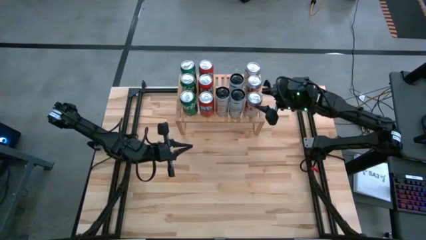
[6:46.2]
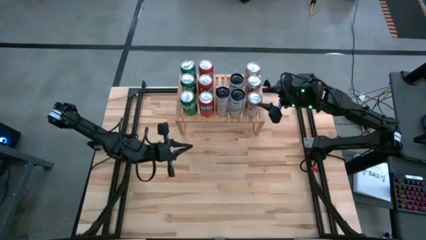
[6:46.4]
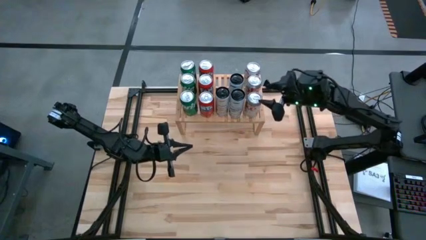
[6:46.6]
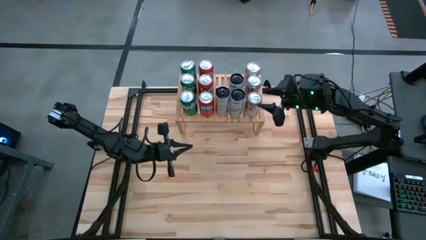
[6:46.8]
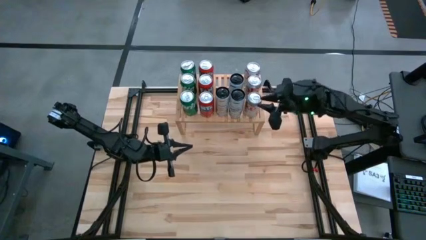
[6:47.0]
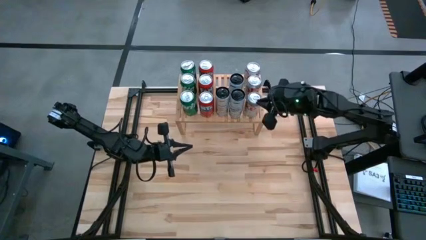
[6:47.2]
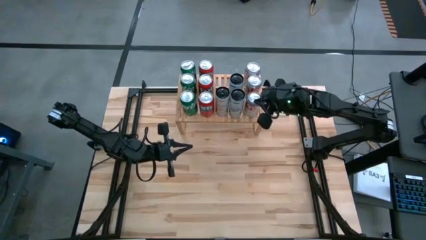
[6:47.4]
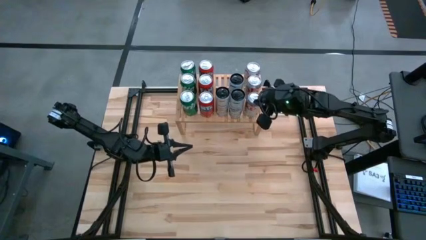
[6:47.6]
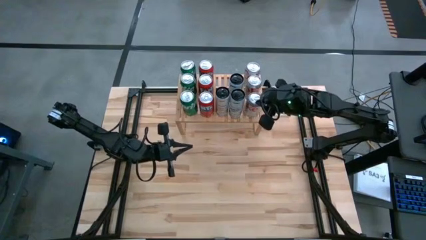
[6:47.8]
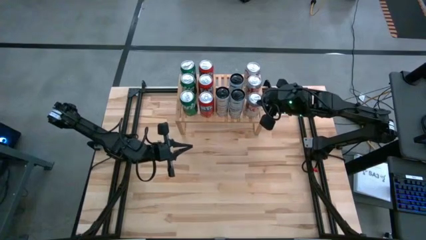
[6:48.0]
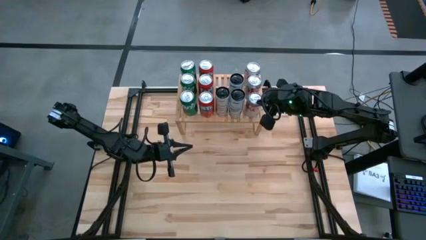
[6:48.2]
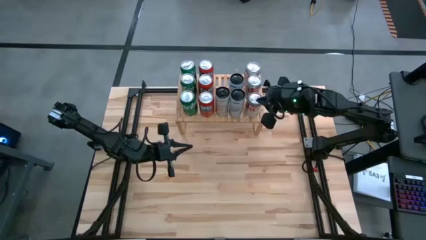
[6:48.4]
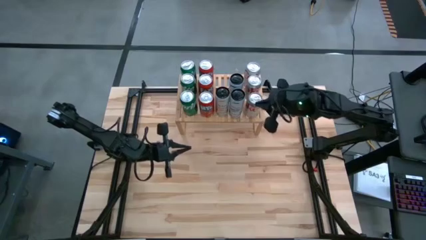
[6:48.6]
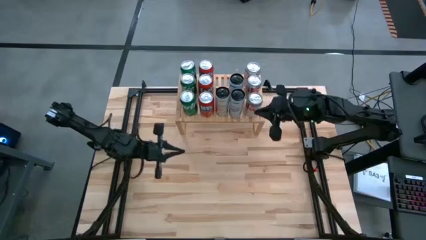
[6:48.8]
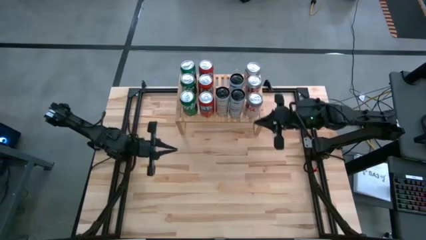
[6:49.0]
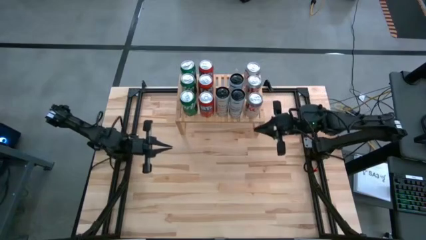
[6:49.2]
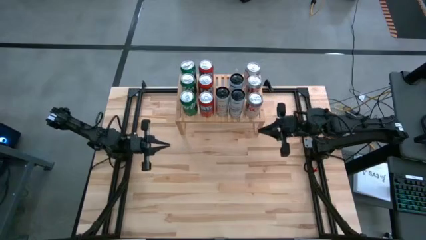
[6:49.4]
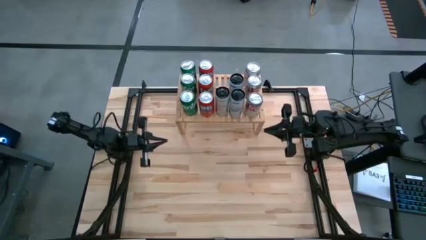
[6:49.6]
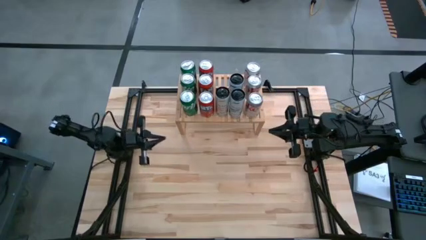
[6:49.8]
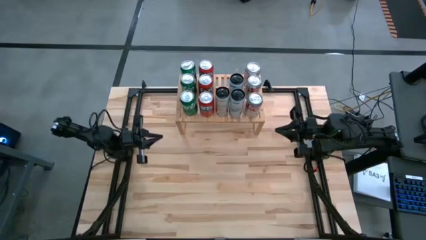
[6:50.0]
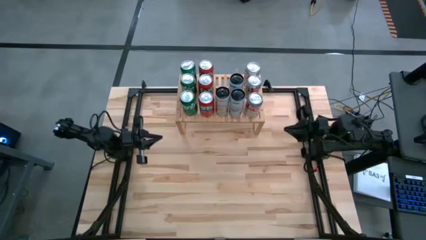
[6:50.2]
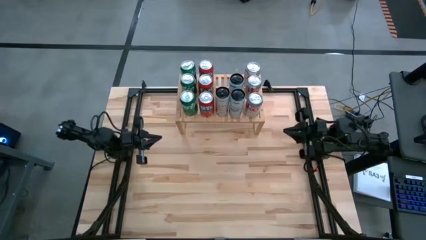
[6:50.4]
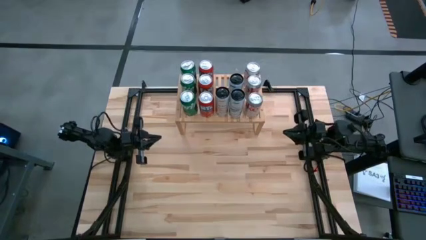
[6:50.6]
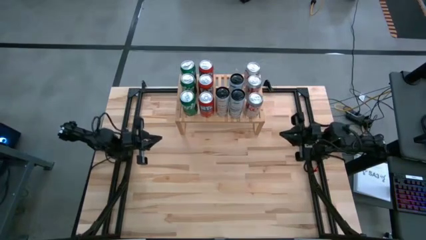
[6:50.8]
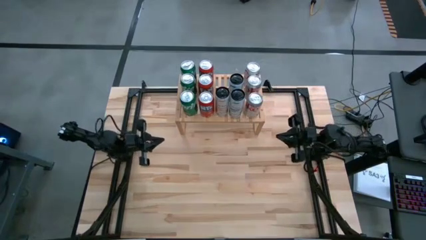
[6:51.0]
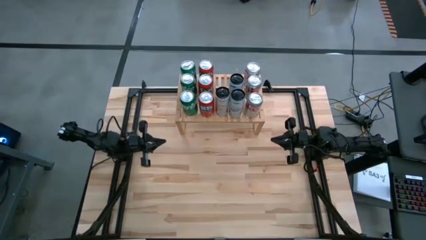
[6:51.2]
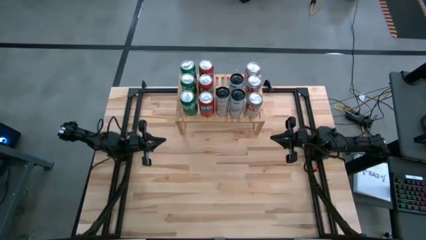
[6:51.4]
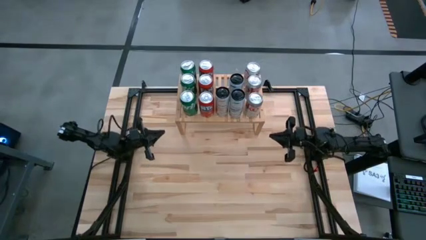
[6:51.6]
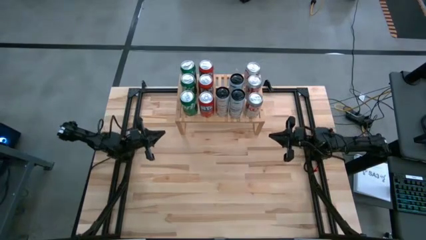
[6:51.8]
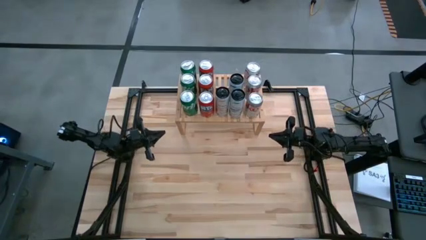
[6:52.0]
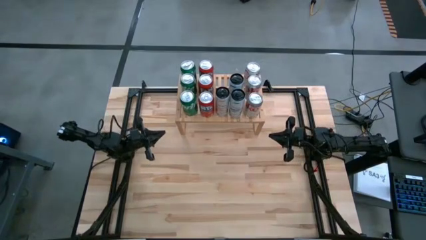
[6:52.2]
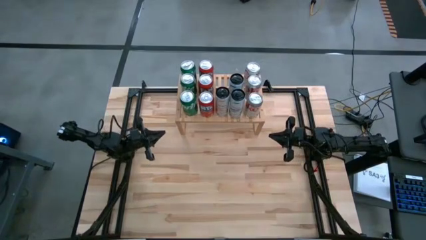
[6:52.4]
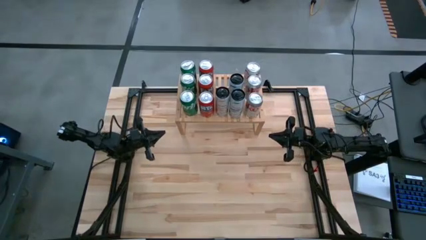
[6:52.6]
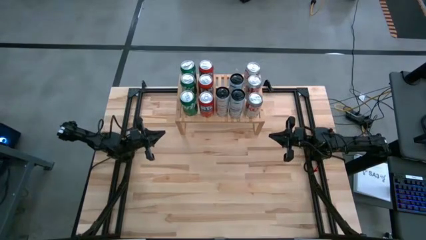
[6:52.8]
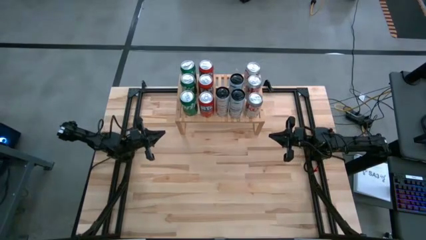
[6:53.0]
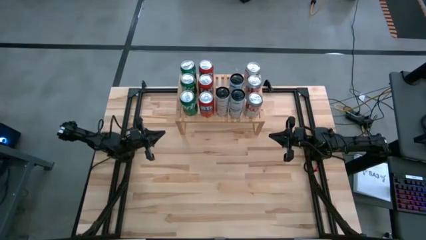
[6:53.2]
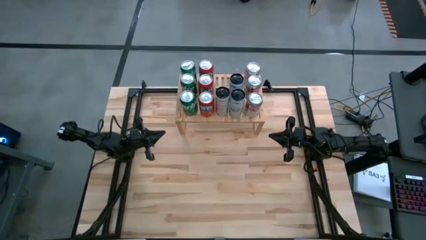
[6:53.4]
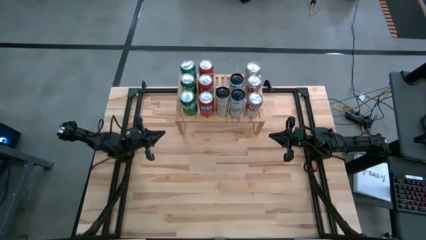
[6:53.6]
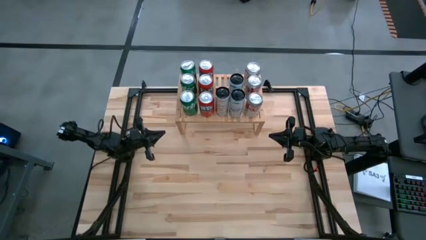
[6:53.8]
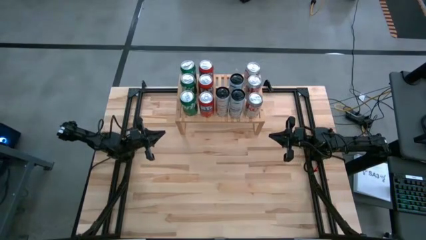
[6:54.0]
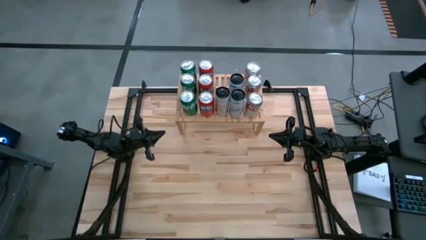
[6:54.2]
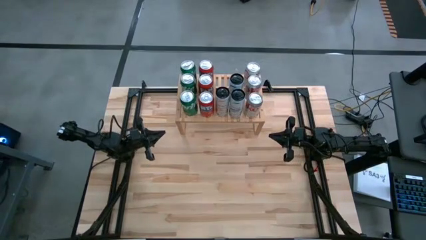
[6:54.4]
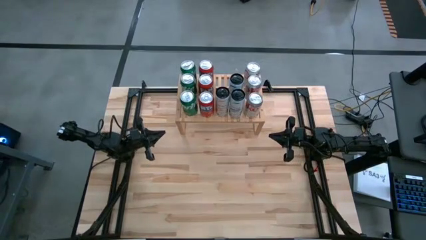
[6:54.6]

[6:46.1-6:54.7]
Task: Place canned beverage on shelf
Return to Home Position

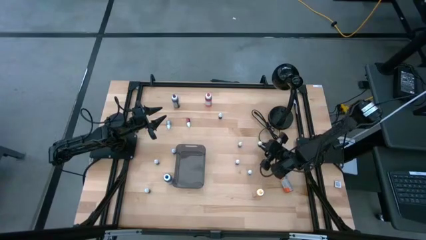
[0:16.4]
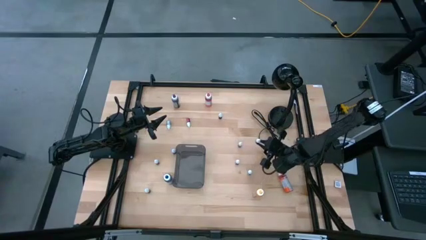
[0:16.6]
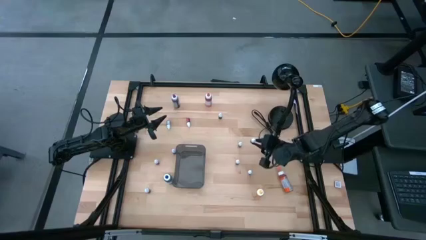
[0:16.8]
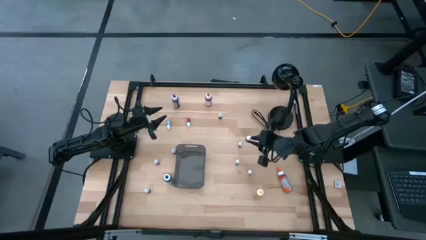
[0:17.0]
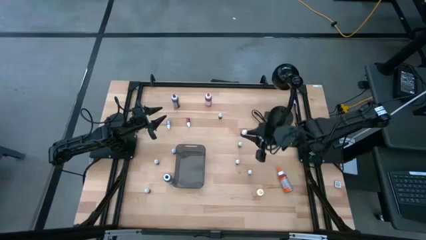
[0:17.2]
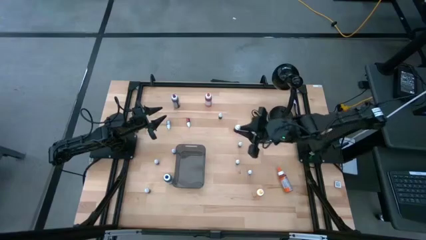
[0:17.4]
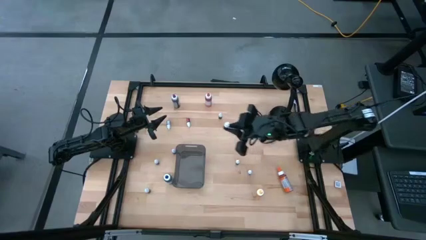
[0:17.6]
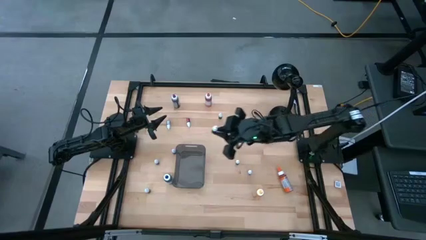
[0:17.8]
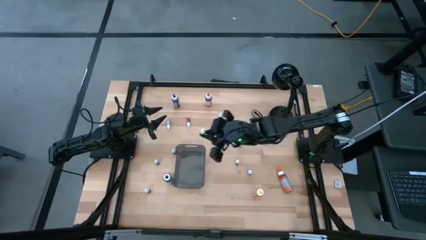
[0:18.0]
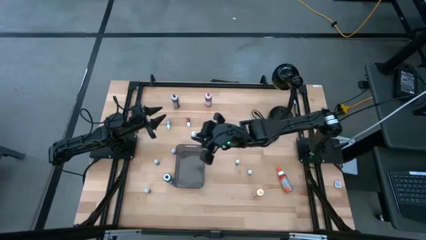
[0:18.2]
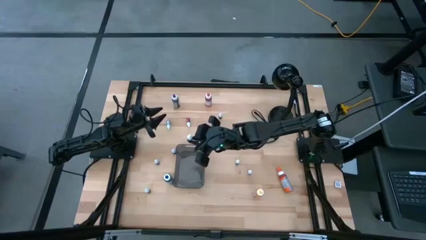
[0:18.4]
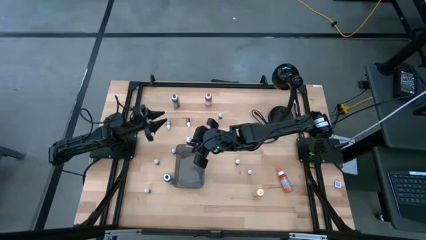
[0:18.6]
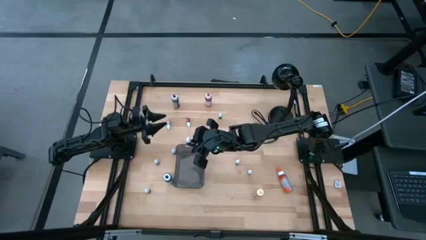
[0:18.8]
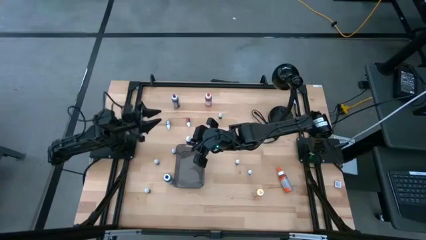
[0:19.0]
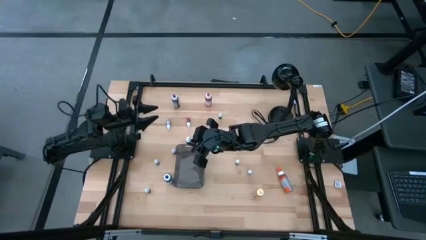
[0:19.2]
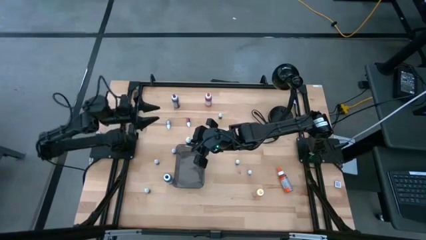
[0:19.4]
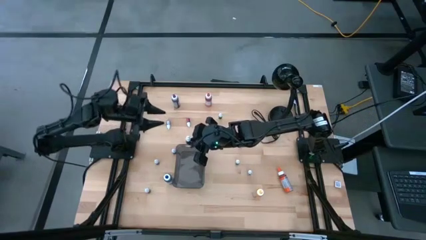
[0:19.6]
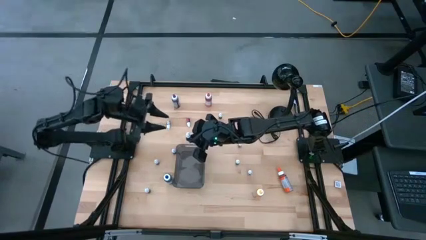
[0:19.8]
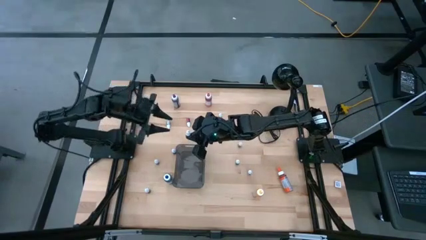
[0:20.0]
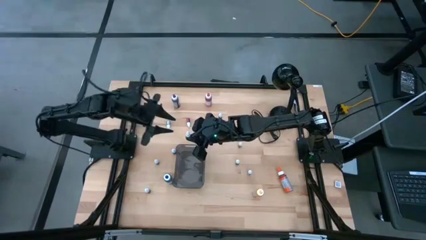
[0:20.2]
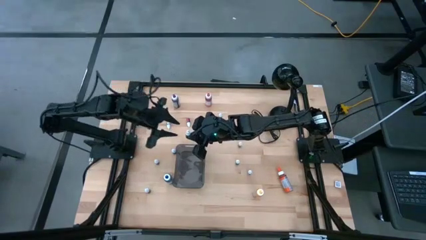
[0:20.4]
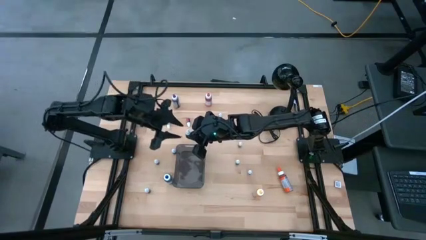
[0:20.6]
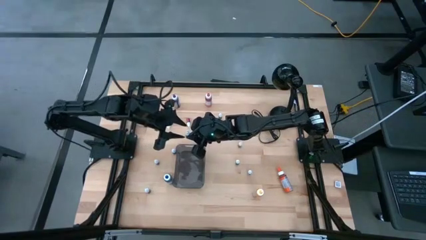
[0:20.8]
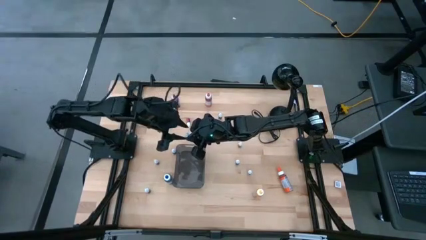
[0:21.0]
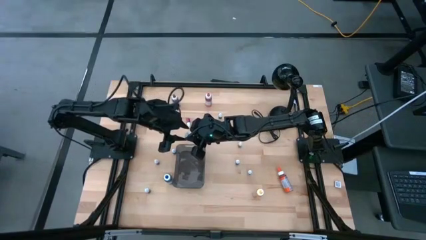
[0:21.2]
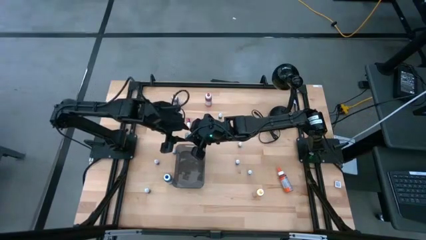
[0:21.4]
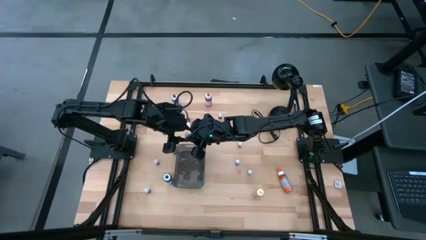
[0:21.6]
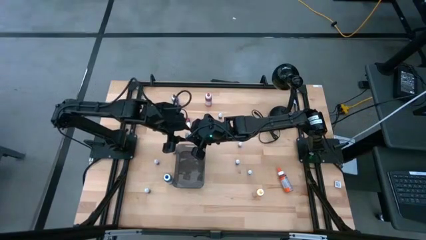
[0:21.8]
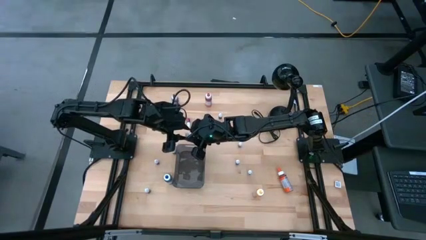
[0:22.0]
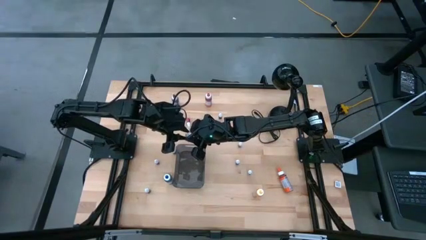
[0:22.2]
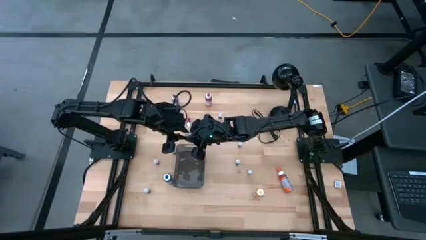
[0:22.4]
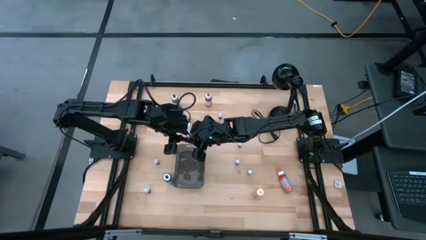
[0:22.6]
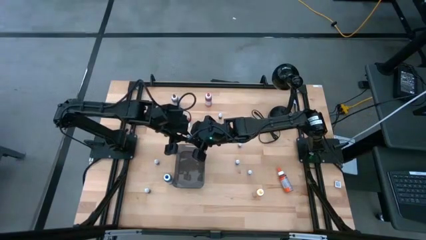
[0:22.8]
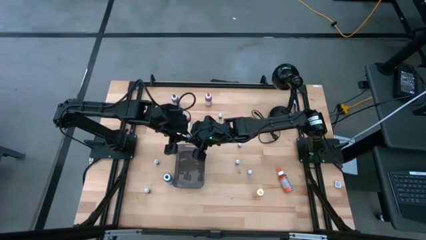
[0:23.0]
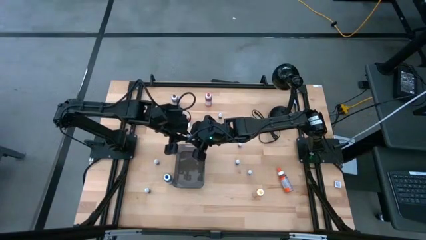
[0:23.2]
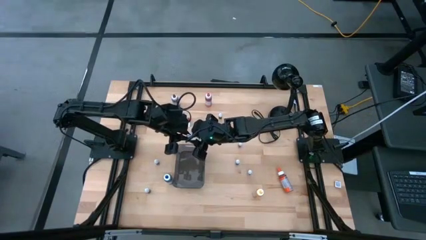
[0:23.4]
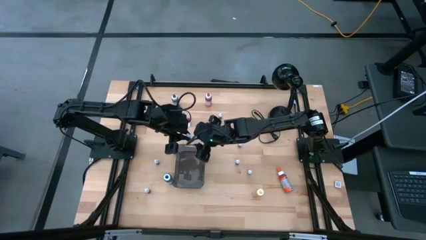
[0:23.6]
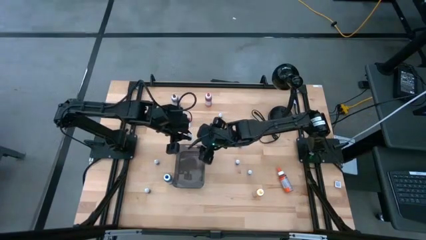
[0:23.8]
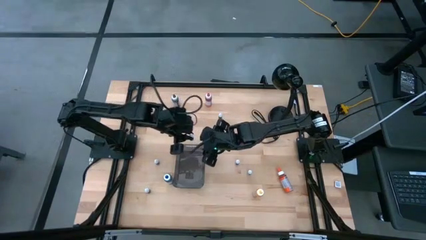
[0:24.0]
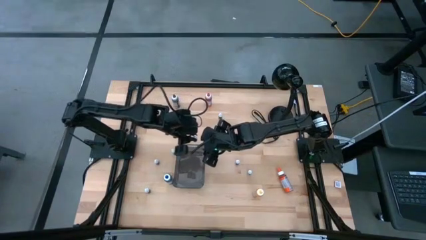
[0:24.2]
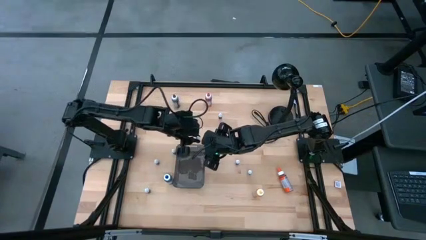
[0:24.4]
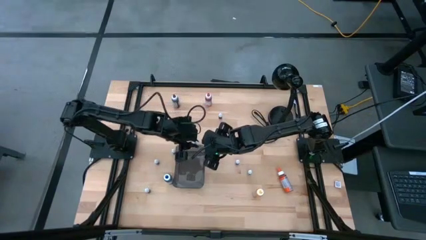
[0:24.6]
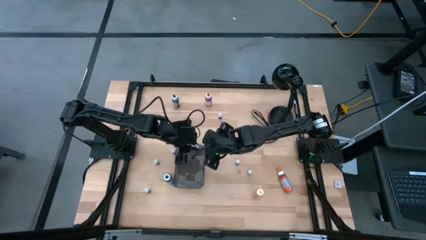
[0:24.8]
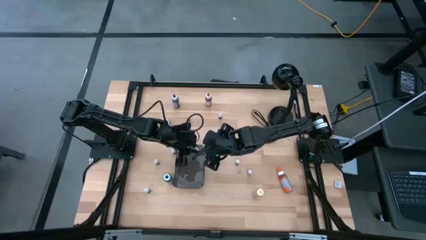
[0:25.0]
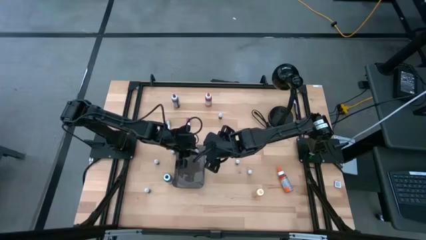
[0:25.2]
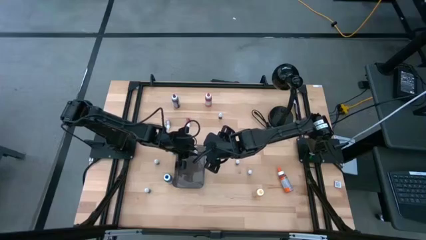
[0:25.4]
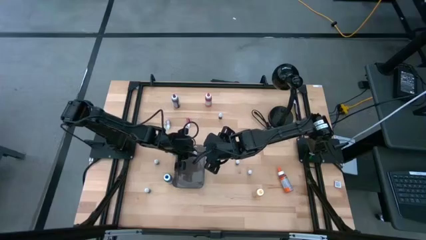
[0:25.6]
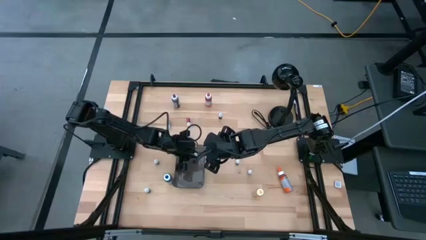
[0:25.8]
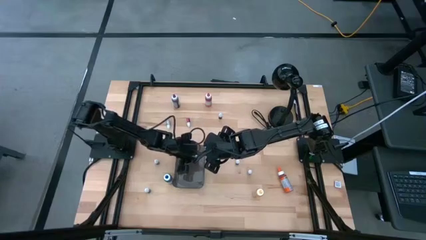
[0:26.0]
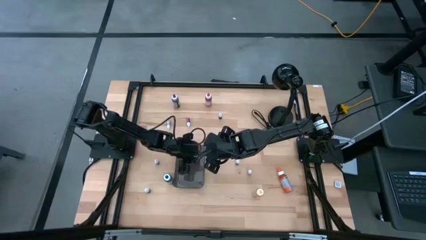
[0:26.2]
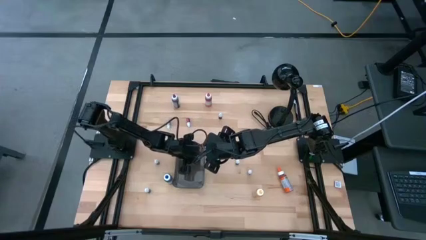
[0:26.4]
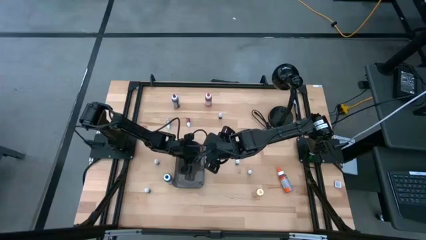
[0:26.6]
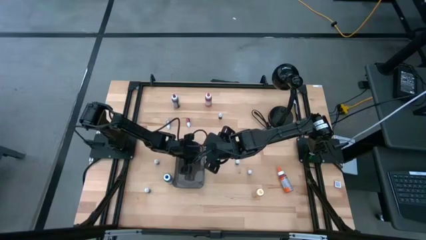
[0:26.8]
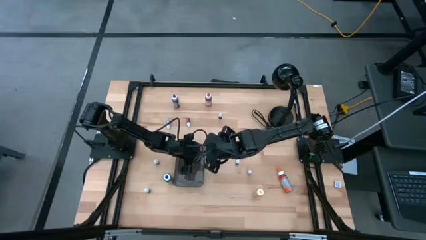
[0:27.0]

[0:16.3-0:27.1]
Task: Pick & Place food coloring
Put the green food coloring bottle into the bin
